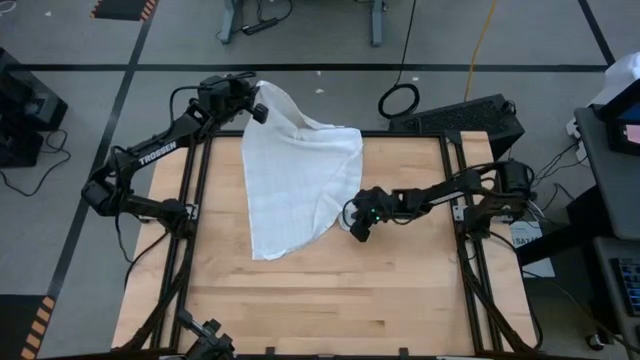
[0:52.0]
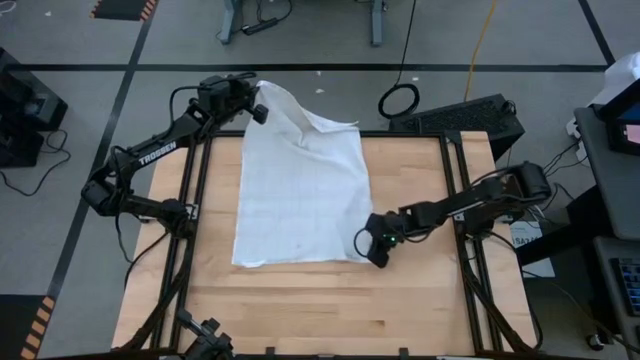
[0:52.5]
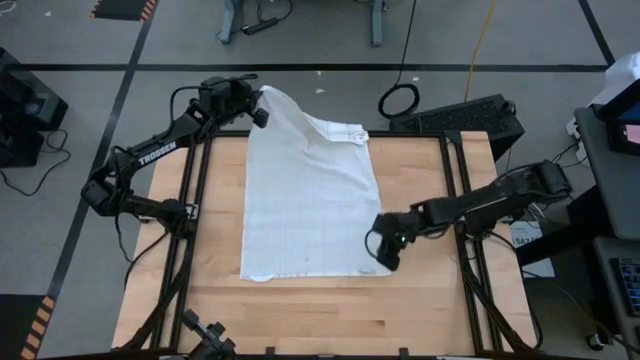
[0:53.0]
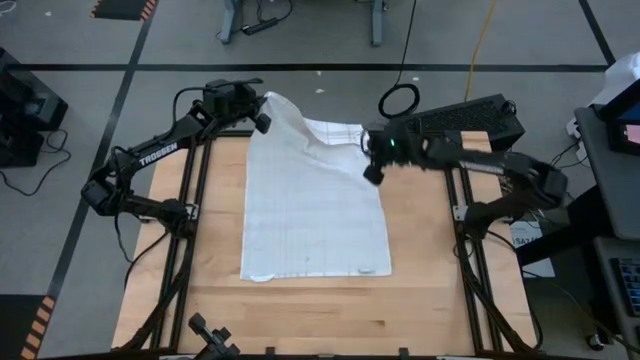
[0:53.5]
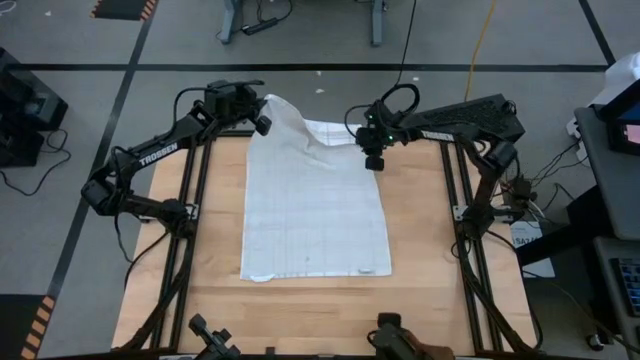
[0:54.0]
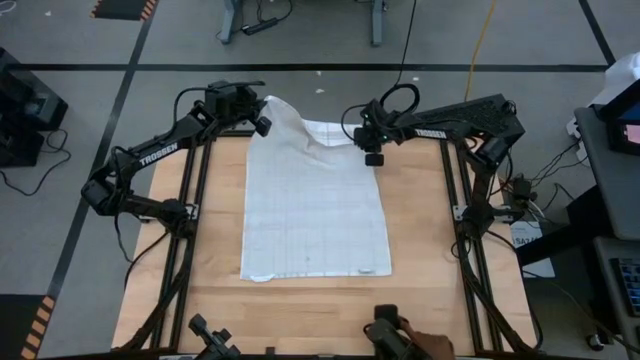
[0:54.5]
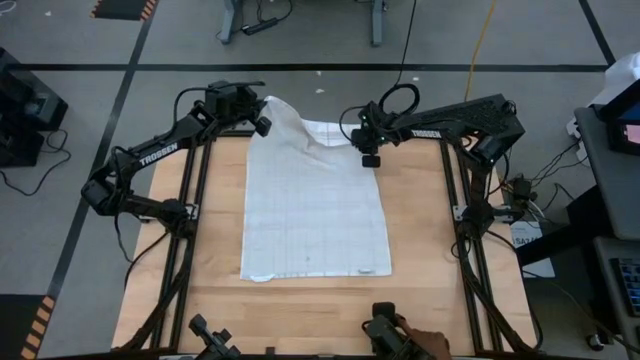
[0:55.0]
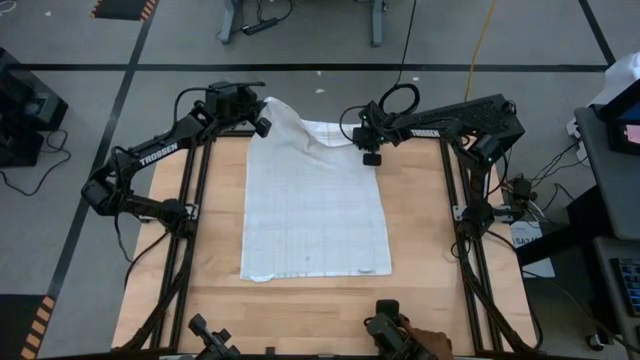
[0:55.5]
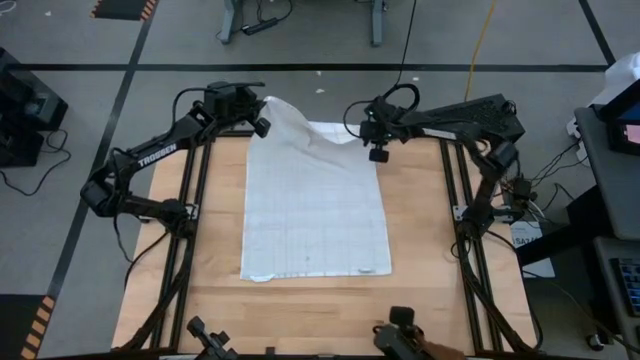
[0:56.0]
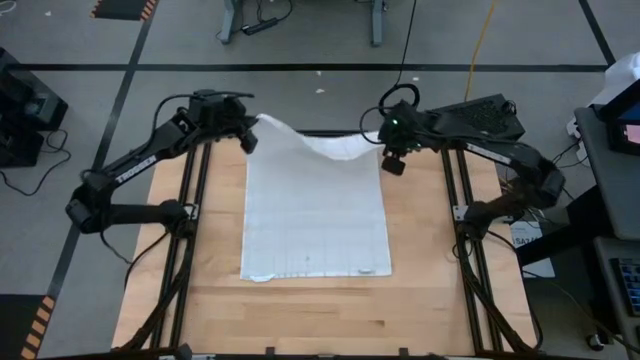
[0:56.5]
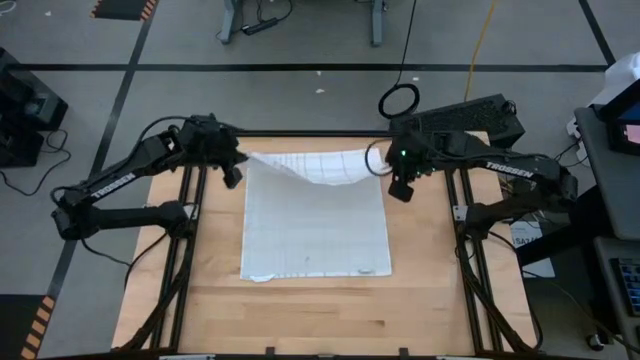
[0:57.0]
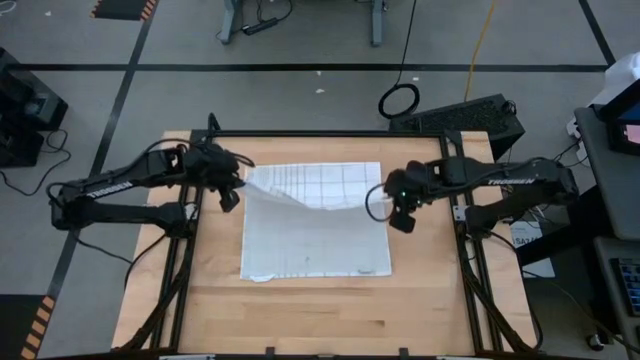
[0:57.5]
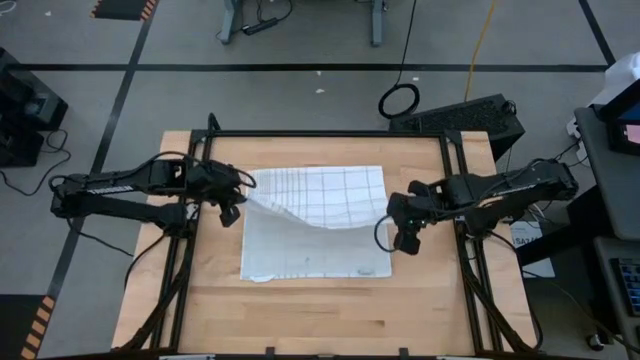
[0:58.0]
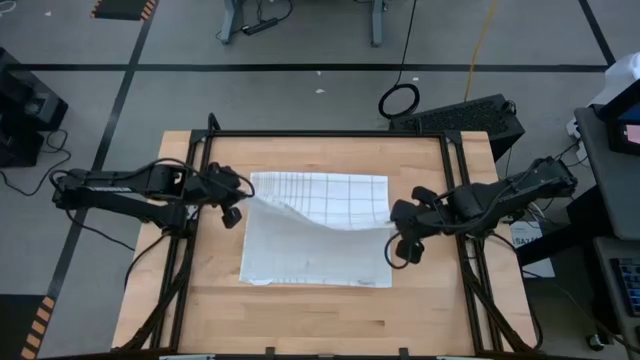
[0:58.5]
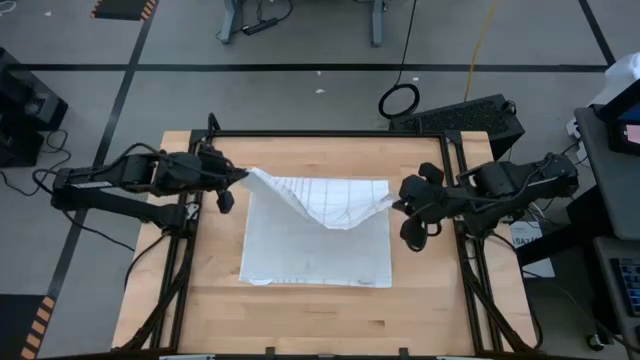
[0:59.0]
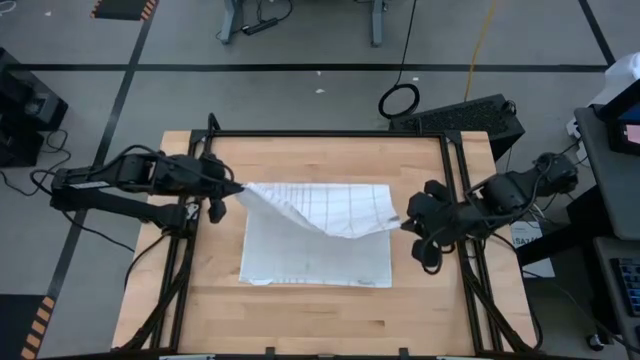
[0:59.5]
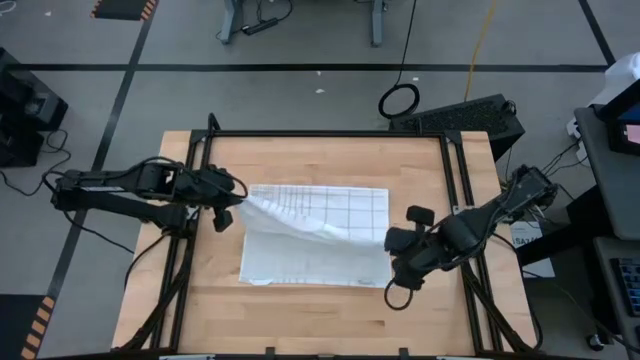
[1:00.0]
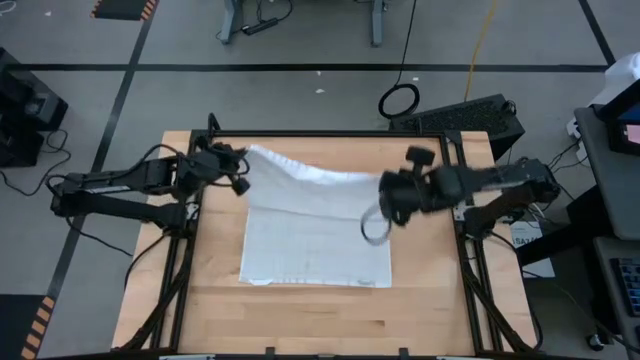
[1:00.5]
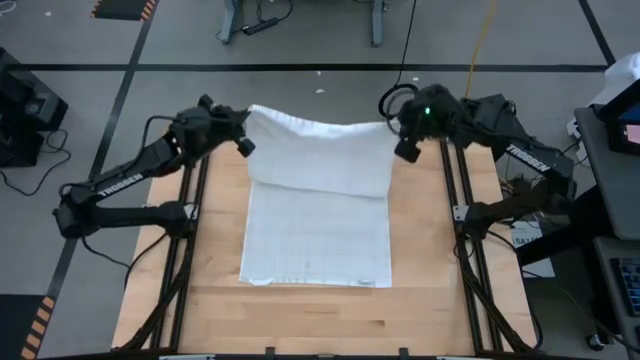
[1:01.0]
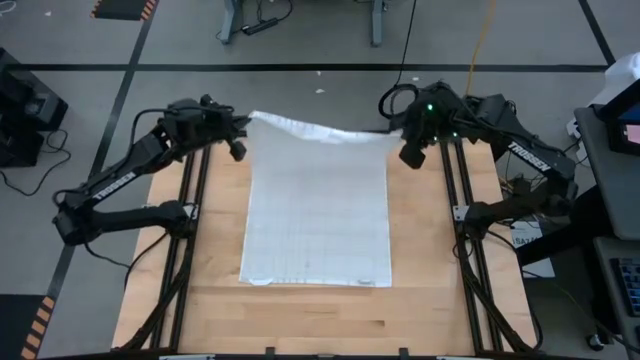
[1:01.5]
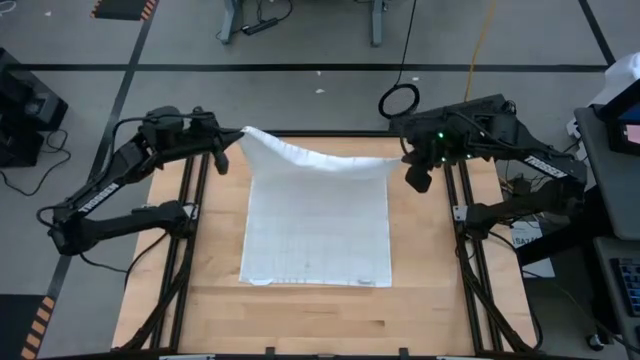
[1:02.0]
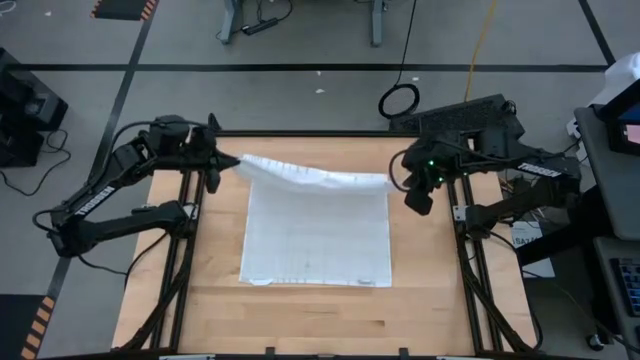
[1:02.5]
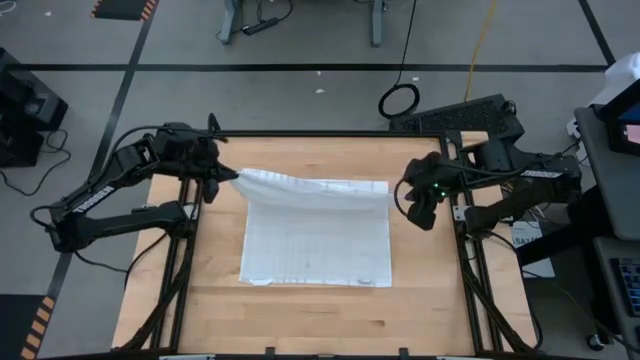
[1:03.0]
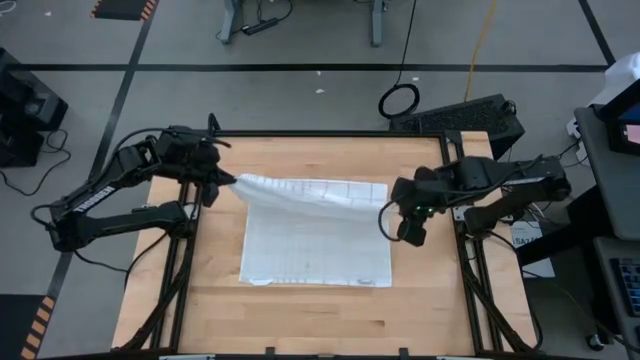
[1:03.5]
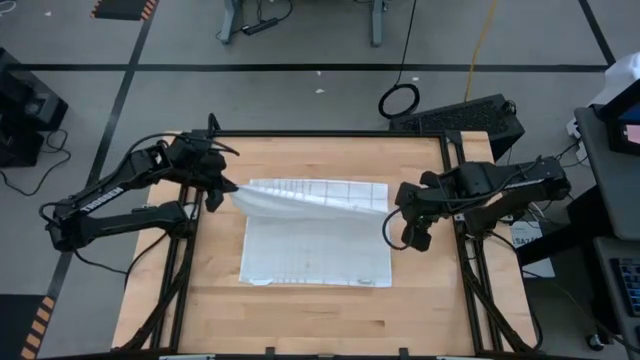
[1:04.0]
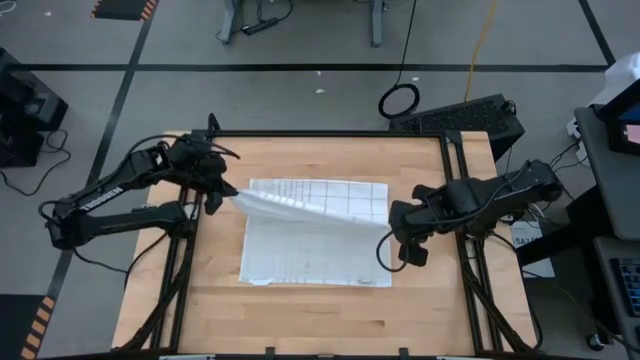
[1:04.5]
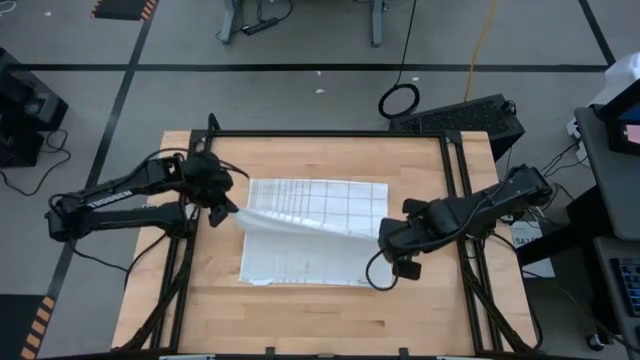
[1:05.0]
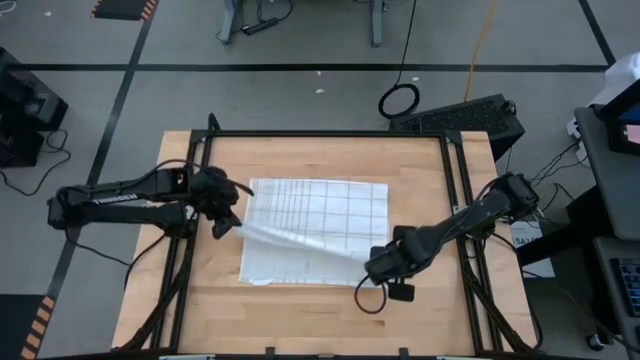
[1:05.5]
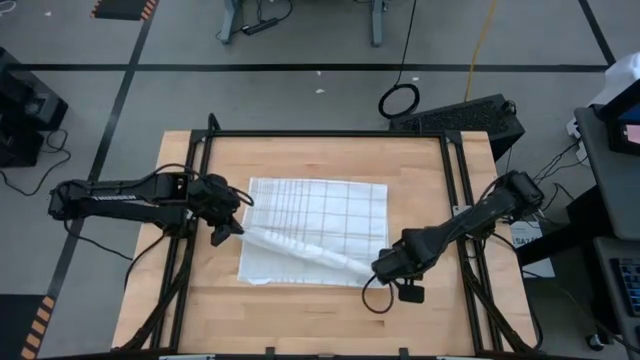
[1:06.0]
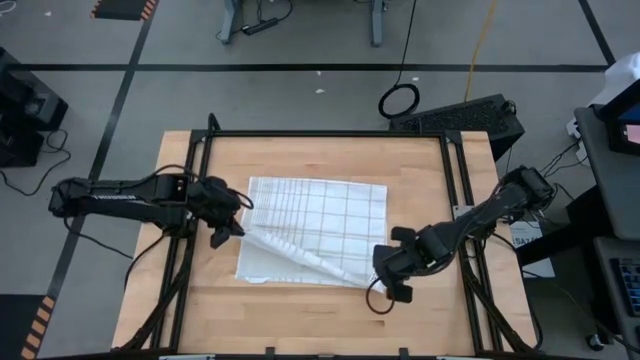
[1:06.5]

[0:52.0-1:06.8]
Task: Roll towel
Roll the white towel

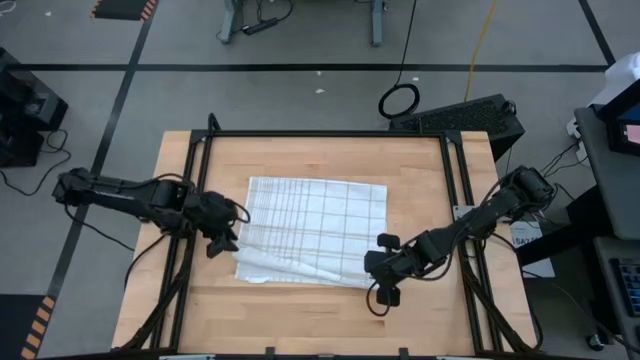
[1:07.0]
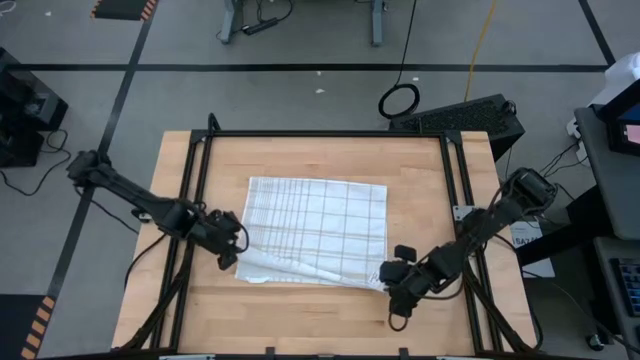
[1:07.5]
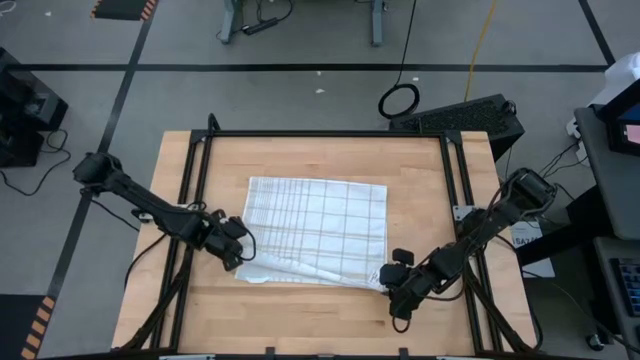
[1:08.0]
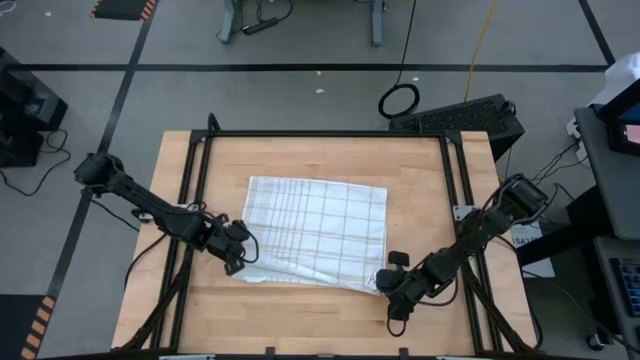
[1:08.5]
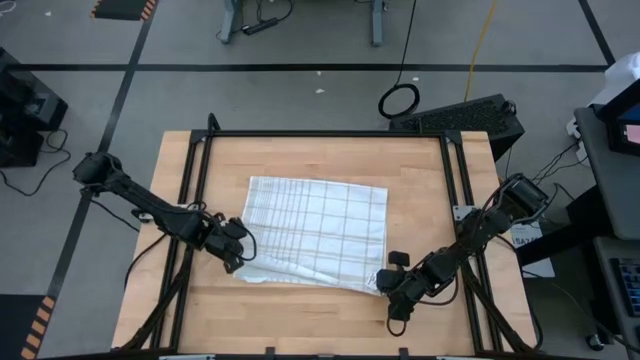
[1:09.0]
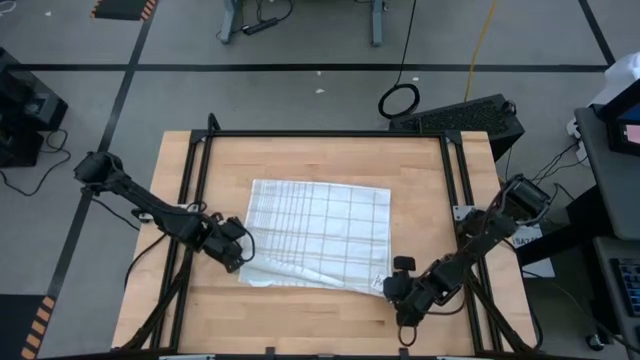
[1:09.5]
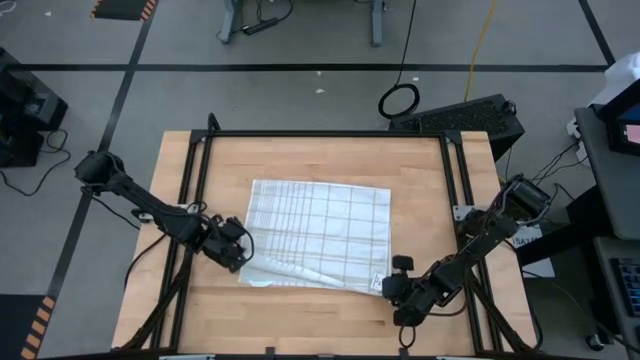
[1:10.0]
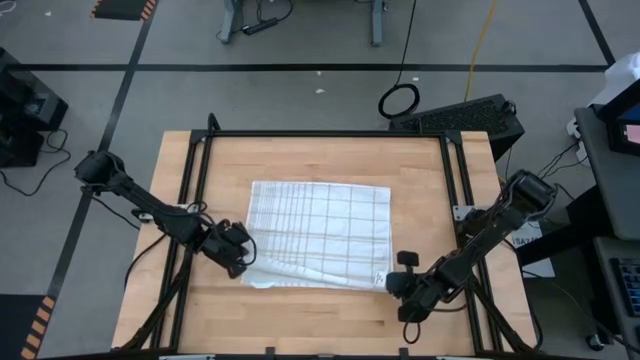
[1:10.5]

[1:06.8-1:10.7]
Roll the white towel

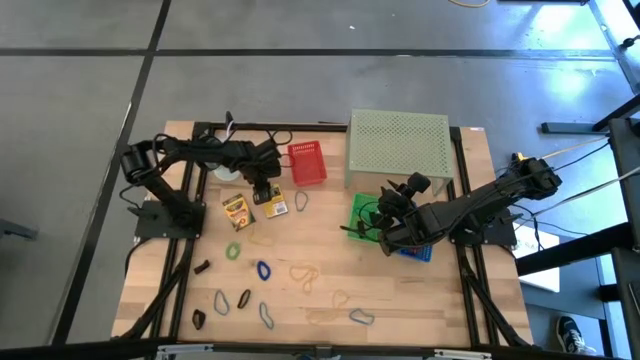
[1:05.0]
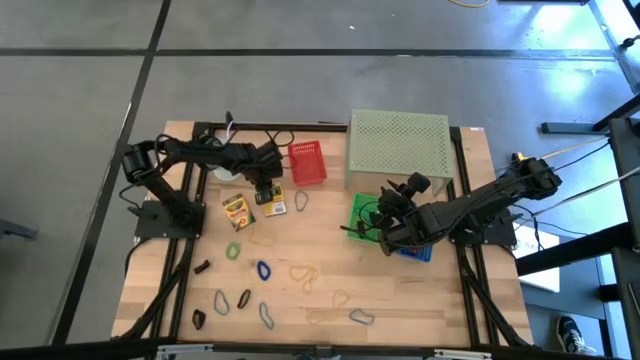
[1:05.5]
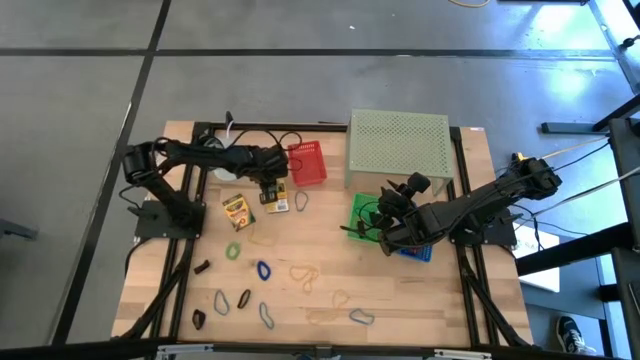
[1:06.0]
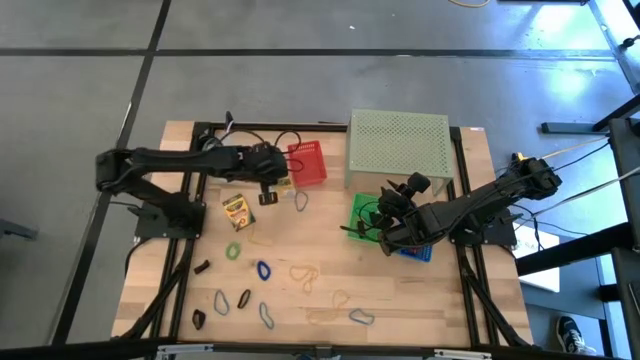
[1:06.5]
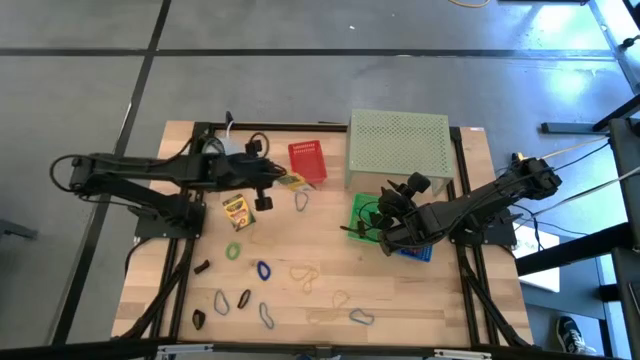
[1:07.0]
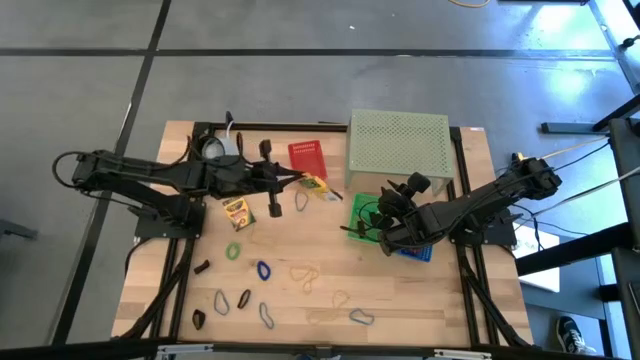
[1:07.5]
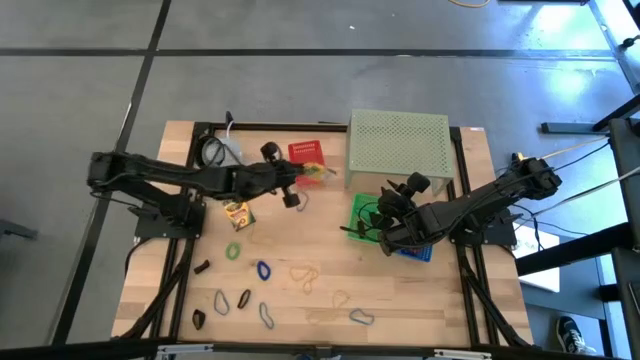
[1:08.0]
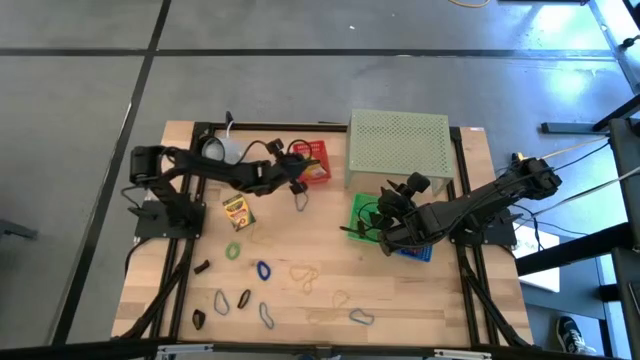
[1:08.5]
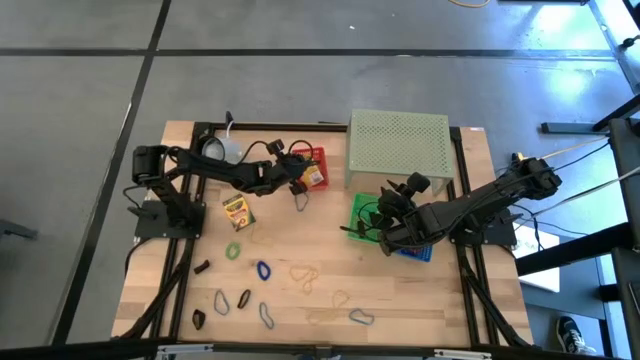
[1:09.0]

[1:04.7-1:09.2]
Task: Pick & Place Office Desk Supplies
Put the yellow crayon box into the red bin
